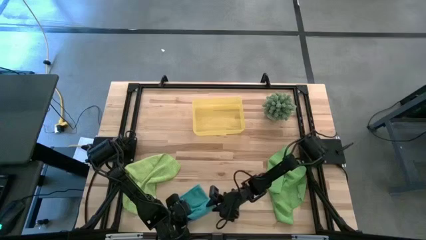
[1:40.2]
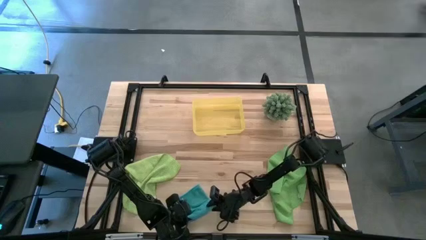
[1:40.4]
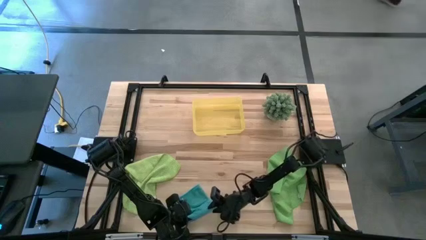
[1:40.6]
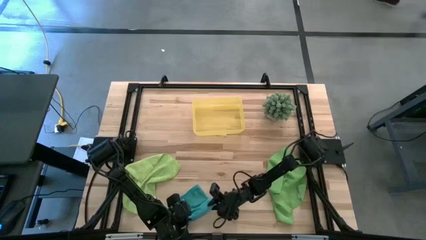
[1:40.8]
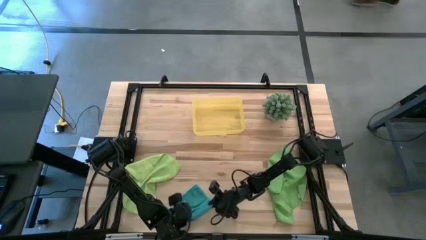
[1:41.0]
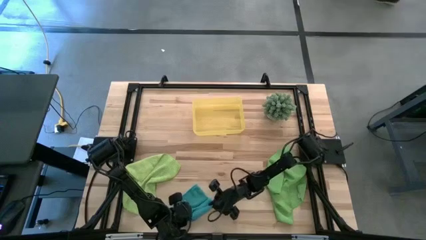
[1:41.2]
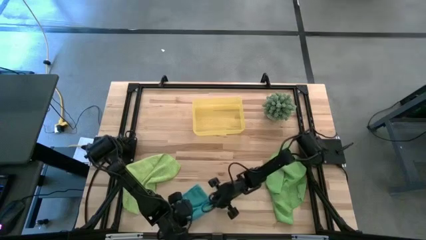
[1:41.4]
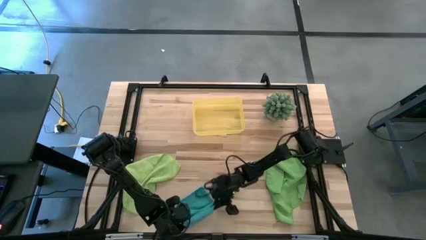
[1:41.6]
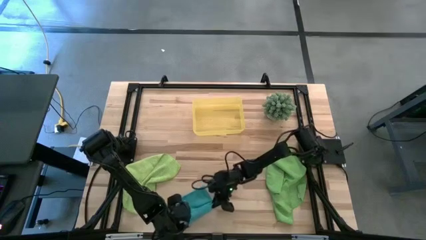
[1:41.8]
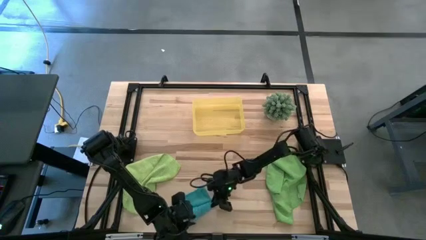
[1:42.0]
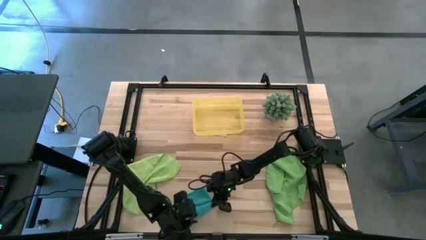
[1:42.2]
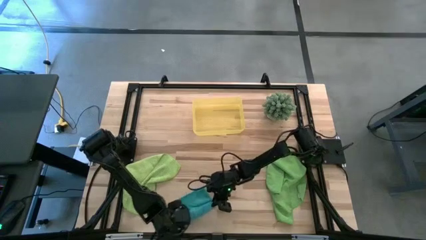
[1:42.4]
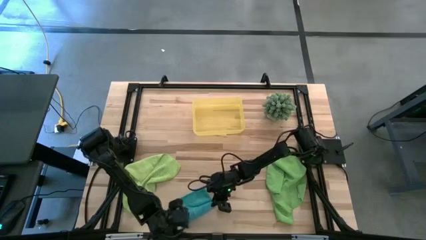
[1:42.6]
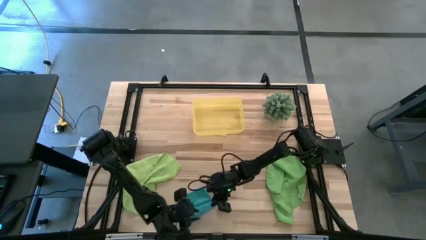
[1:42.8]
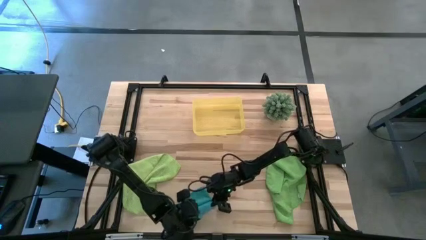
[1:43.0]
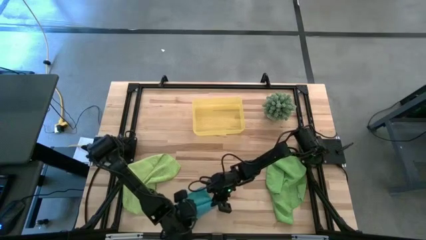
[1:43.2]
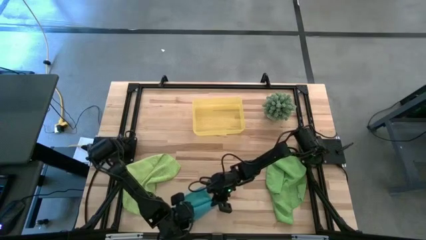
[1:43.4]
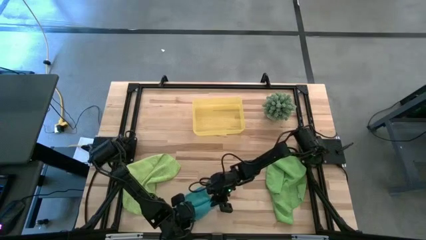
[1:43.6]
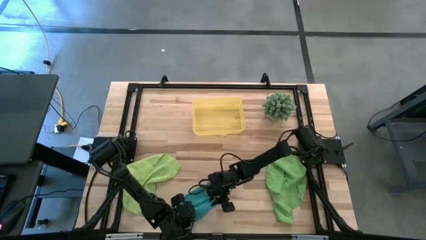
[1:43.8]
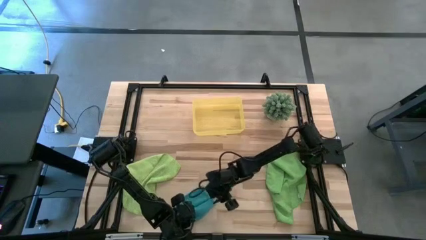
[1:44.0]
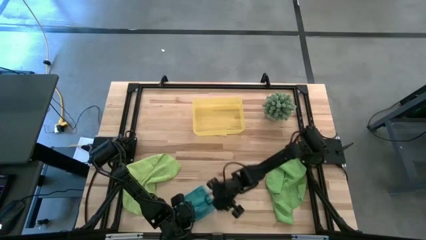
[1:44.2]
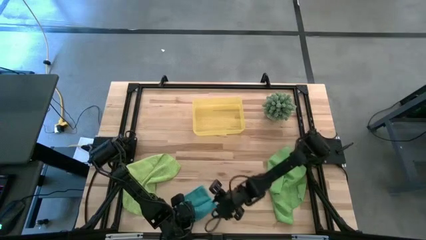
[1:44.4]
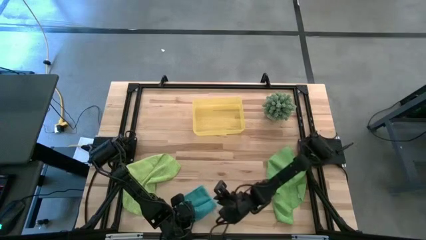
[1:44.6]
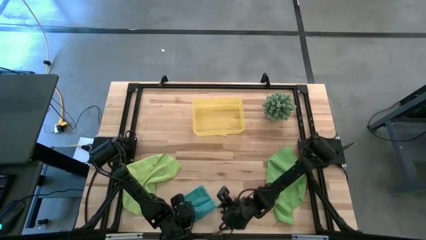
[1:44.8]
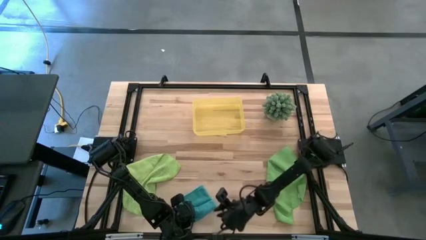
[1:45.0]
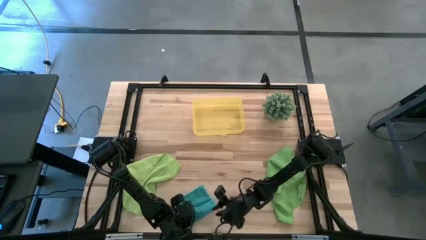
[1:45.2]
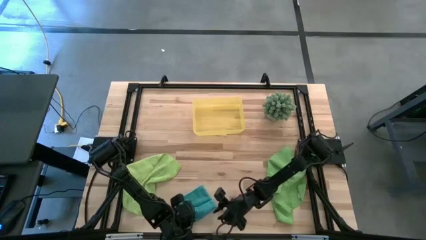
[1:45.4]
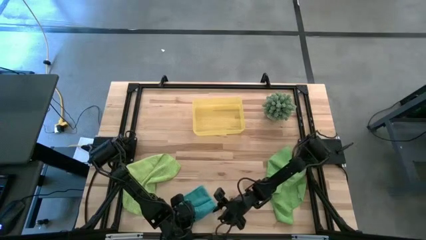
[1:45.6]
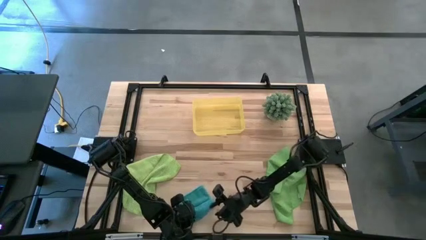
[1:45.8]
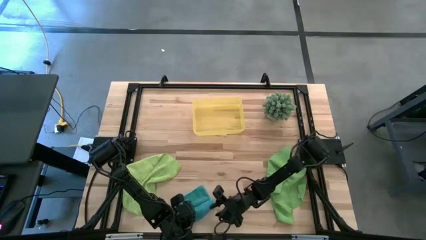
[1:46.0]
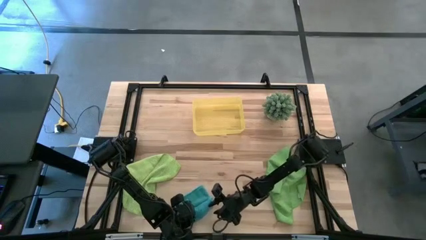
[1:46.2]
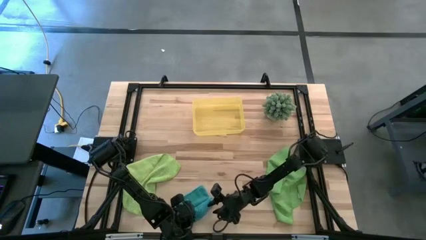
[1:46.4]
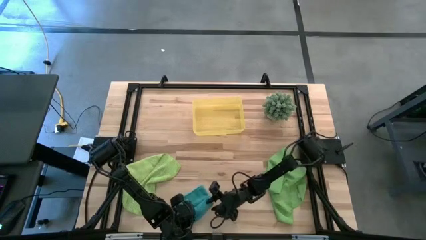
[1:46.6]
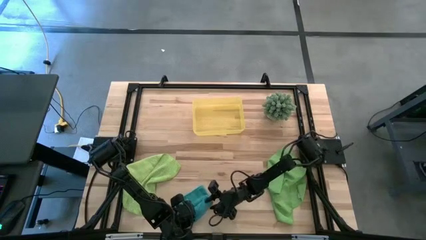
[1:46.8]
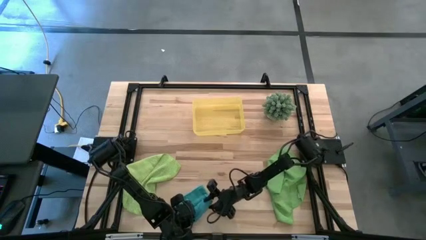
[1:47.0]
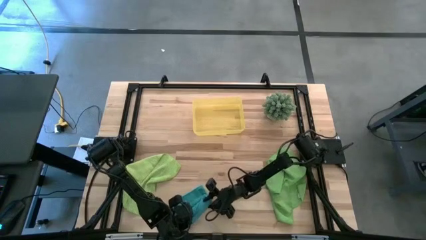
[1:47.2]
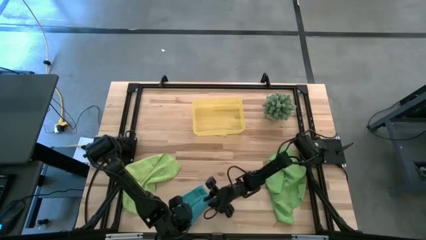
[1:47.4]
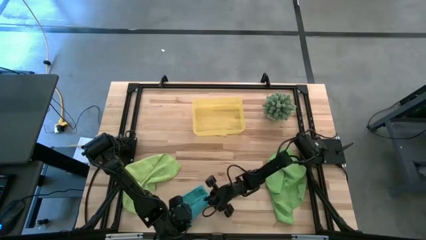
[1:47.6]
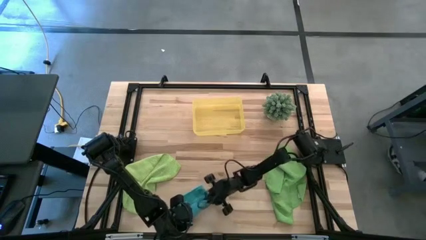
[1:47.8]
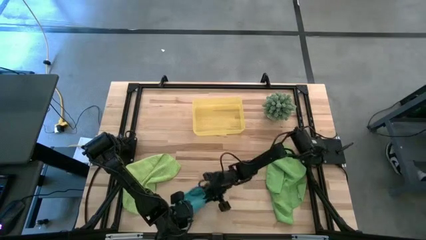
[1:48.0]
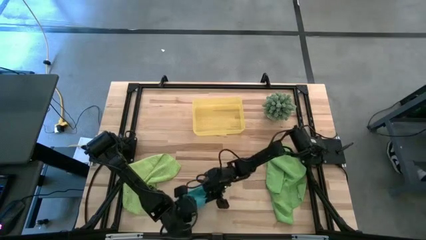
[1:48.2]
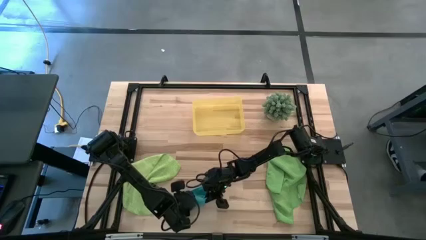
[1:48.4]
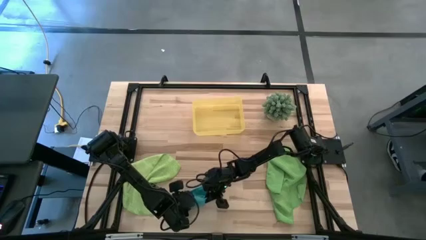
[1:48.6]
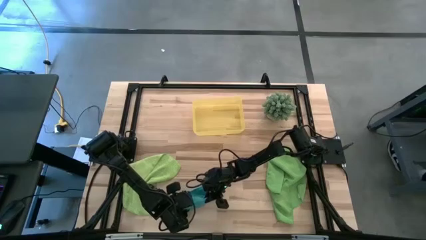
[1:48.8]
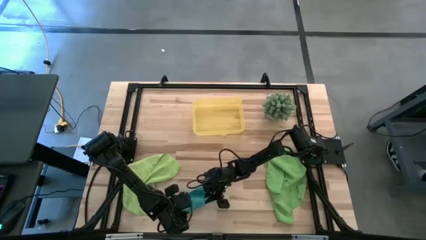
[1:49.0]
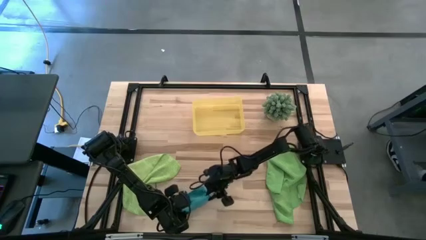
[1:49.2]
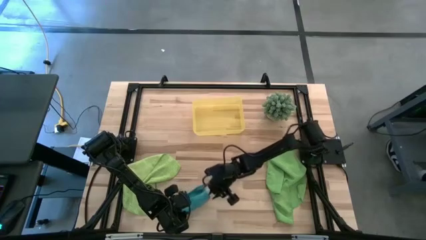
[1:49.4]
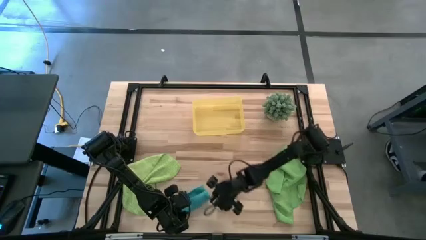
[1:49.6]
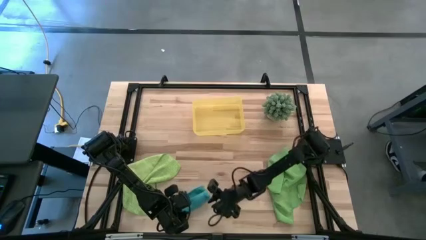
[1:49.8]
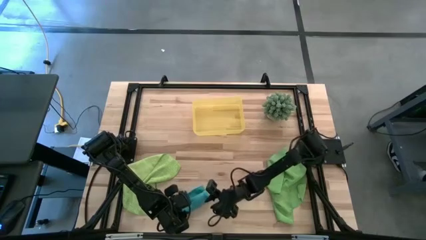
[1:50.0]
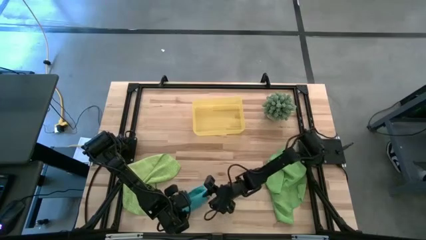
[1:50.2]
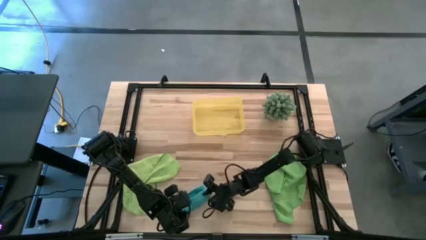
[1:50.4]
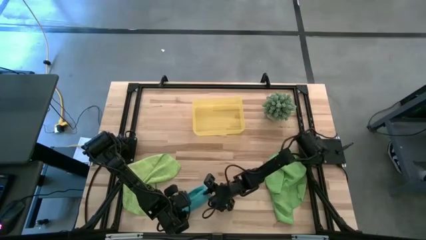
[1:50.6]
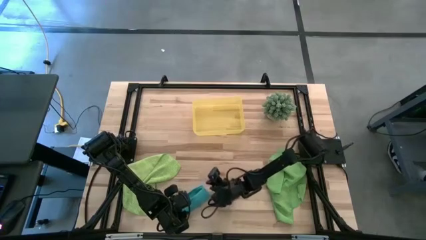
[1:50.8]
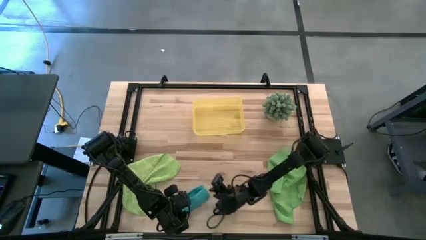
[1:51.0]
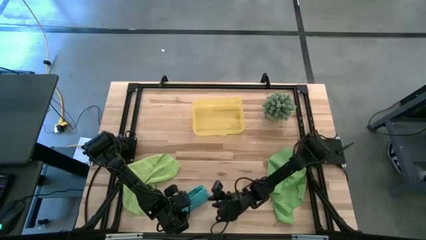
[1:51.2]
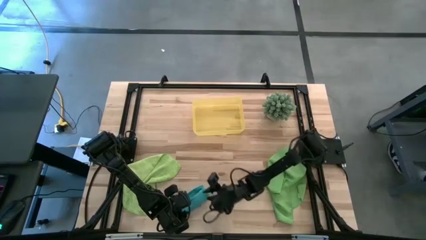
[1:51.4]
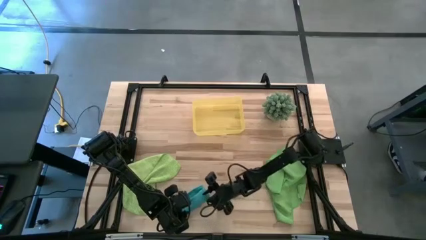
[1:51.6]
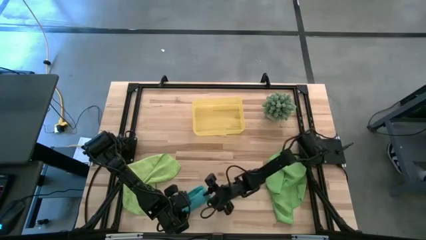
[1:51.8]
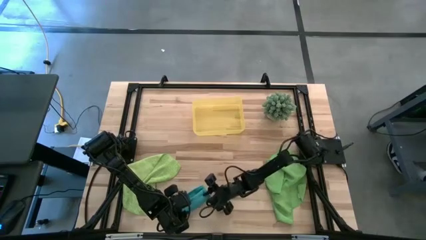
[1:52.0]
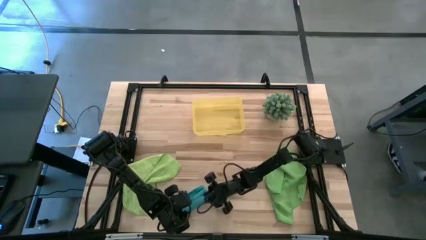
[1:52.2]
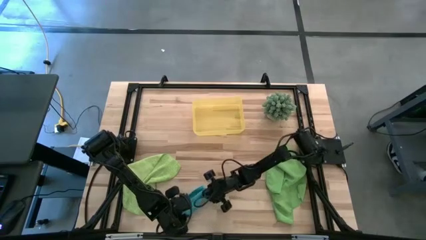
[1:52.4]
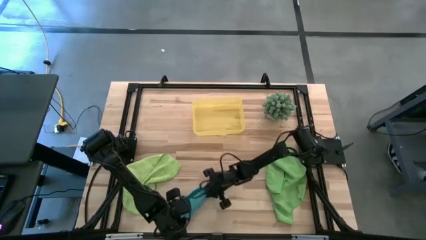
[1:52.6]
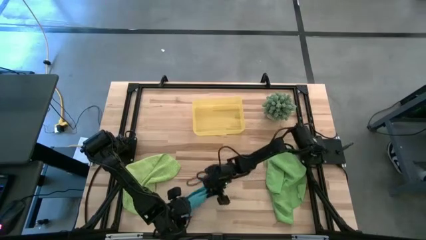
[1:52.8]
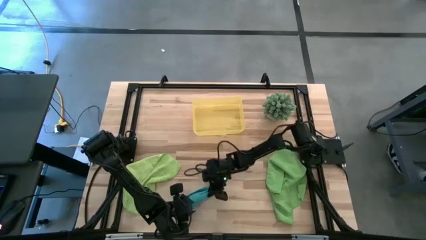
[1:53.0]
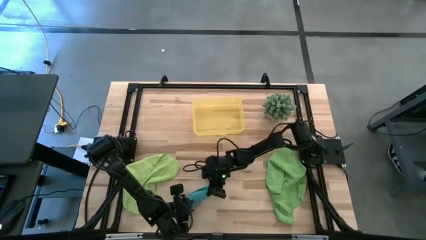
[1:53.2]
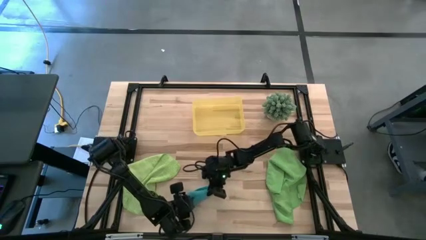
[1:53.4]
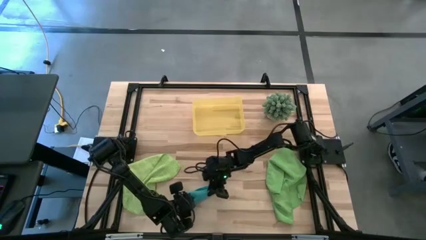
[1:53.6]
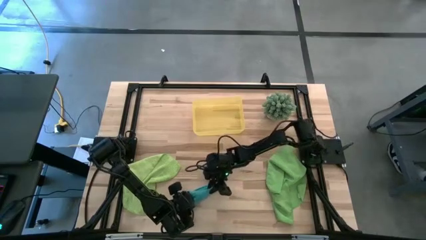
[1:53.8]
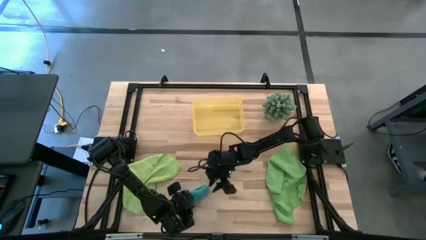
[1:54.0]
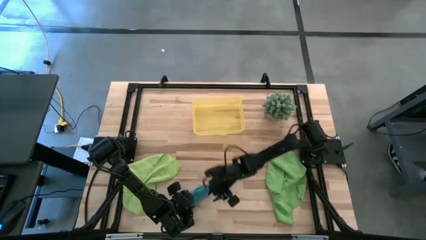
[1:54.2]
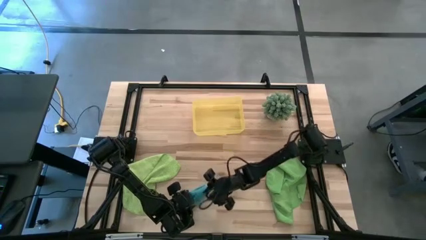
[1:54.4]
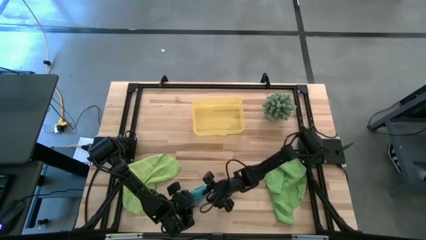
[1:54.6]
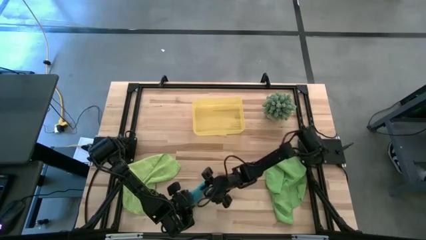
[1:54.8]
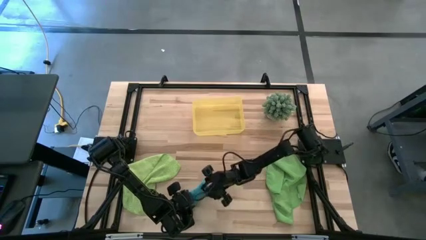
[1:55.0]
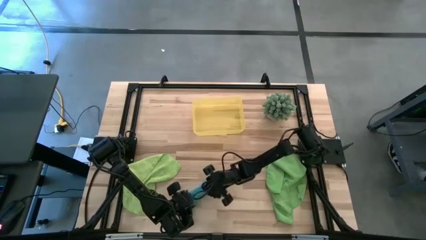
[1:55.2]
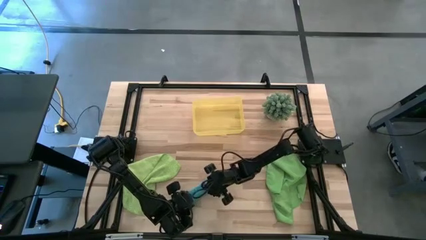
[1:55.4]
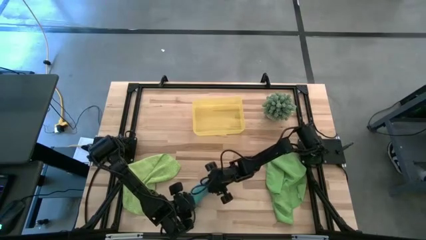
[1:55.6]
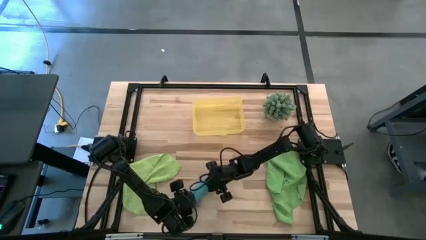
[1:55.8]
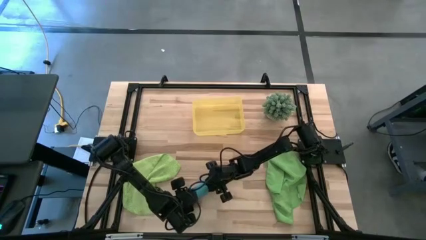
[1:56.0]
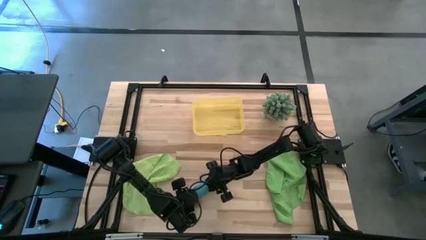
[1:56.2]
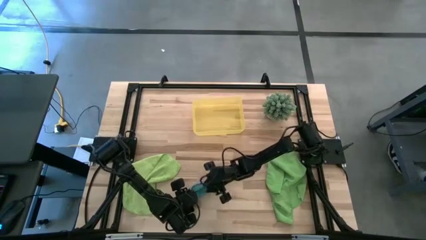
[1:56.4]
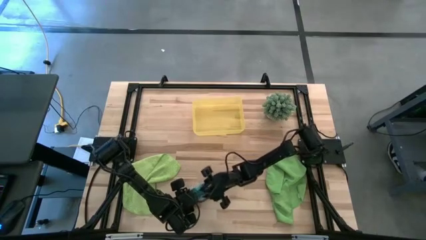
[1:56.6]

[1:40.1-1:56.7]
Task: Roll microfiber towels into tight, uniform cylinder then place into a basket
Roll the blue microfiber cloth
